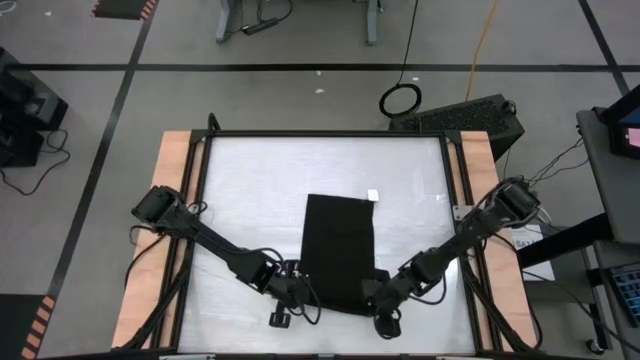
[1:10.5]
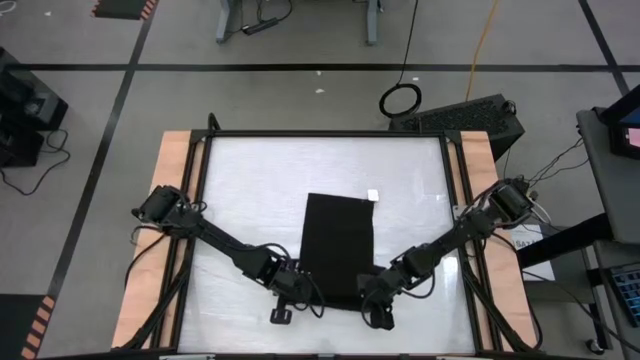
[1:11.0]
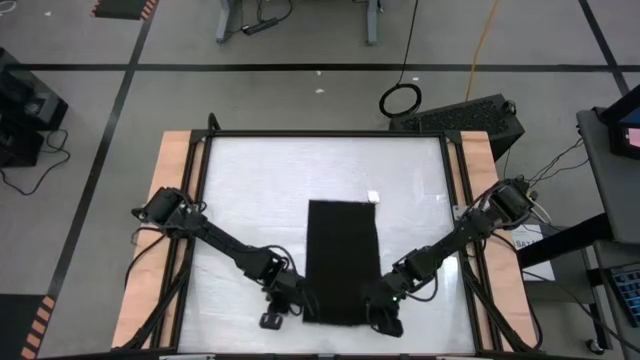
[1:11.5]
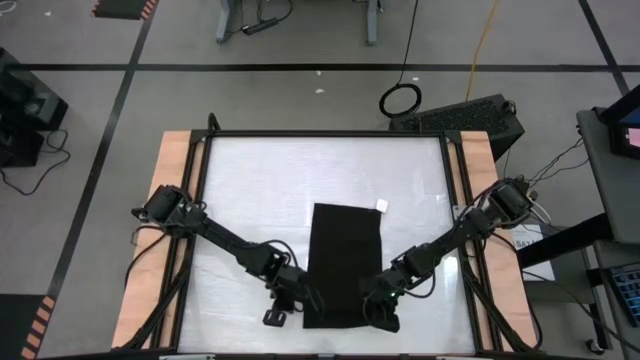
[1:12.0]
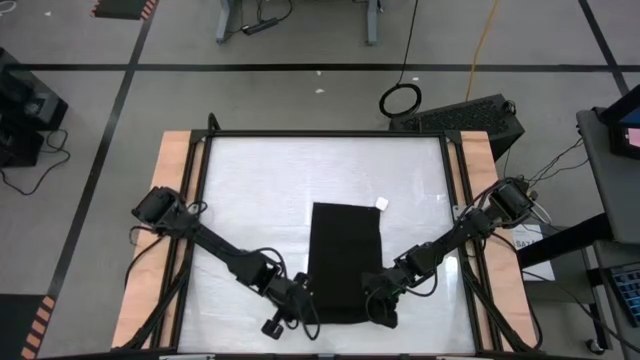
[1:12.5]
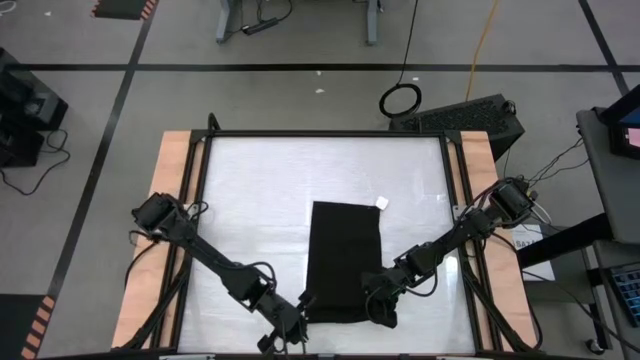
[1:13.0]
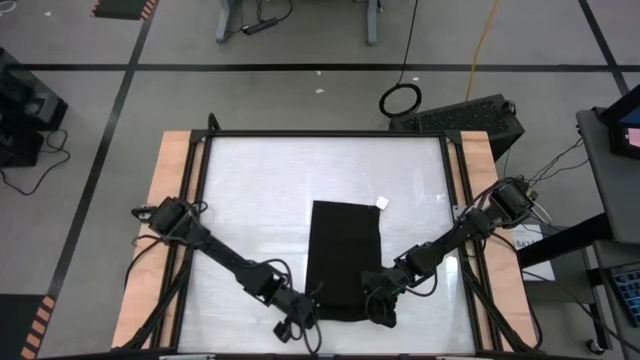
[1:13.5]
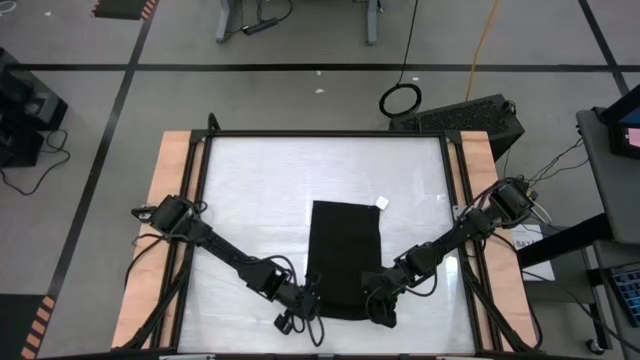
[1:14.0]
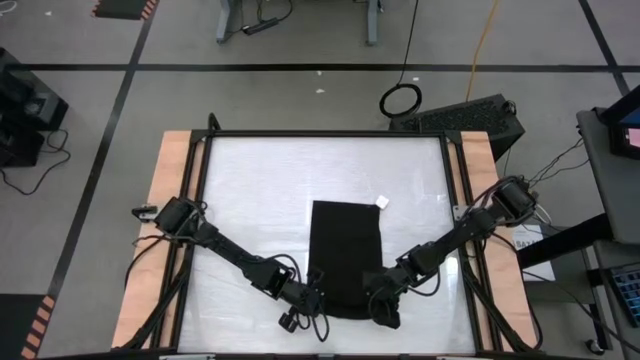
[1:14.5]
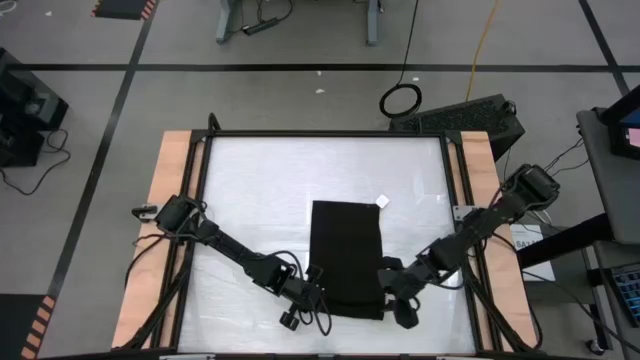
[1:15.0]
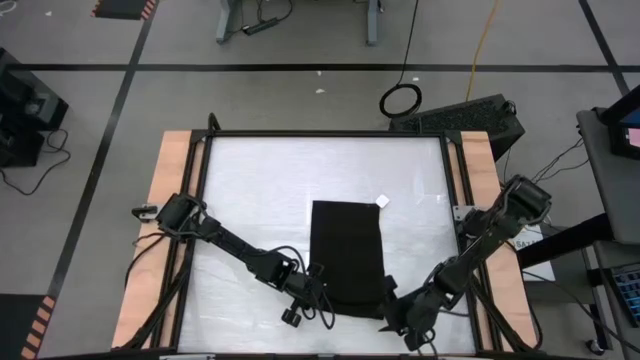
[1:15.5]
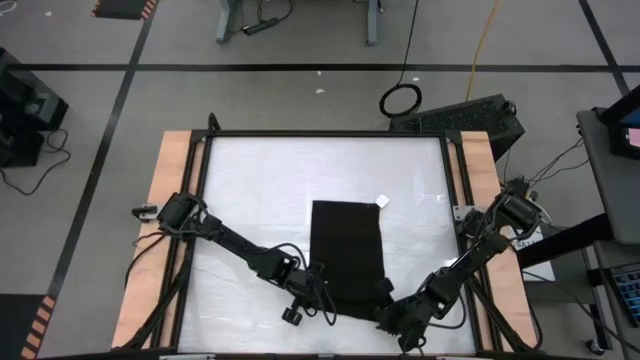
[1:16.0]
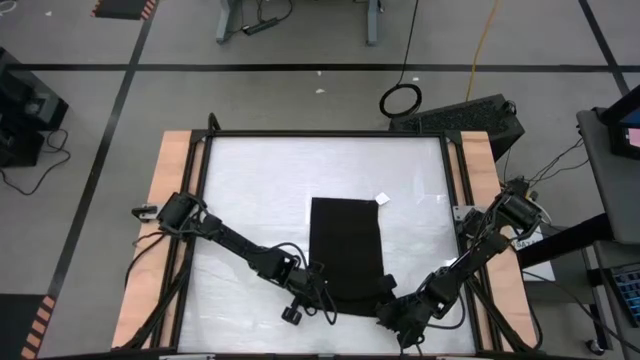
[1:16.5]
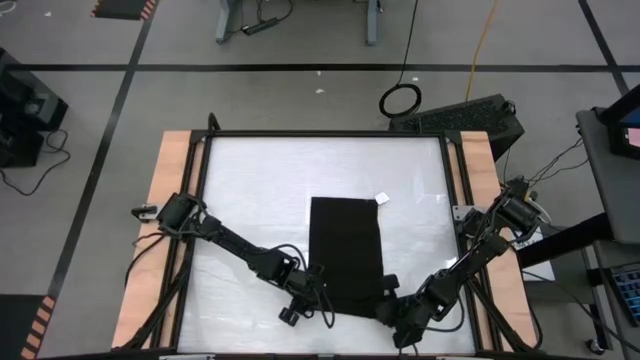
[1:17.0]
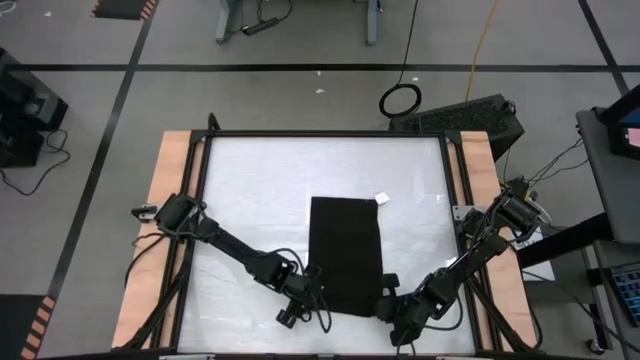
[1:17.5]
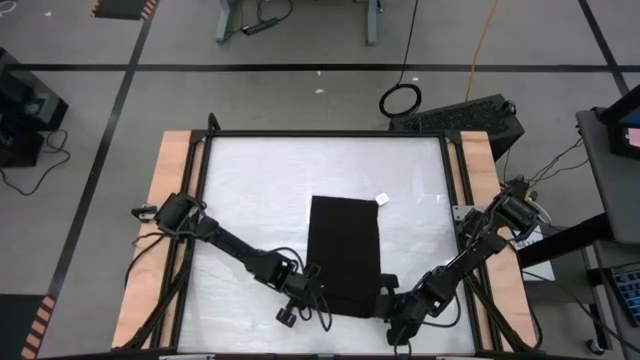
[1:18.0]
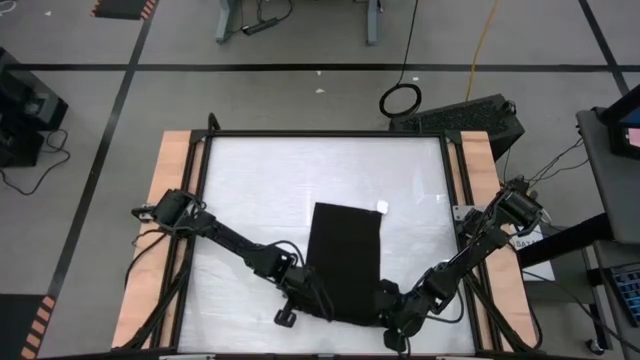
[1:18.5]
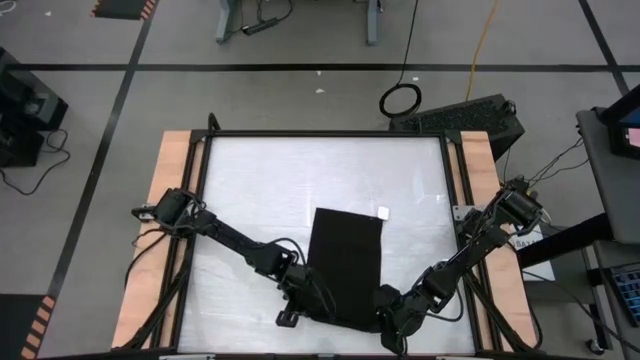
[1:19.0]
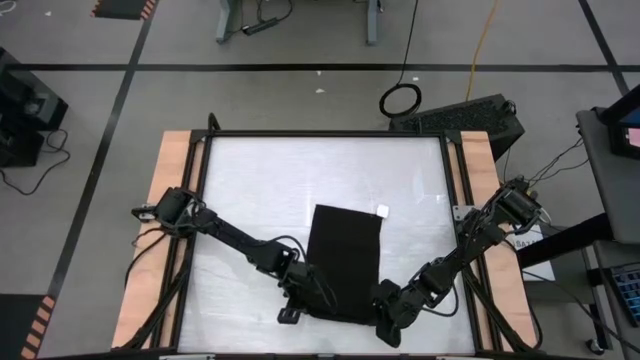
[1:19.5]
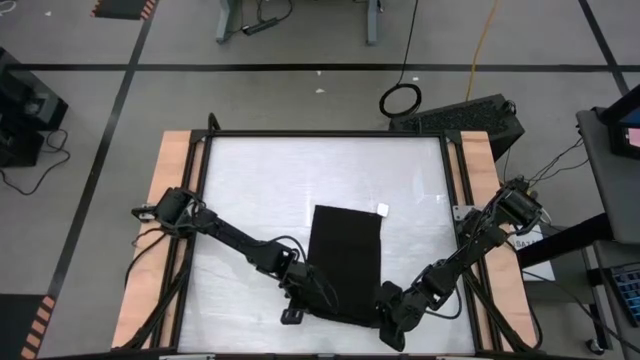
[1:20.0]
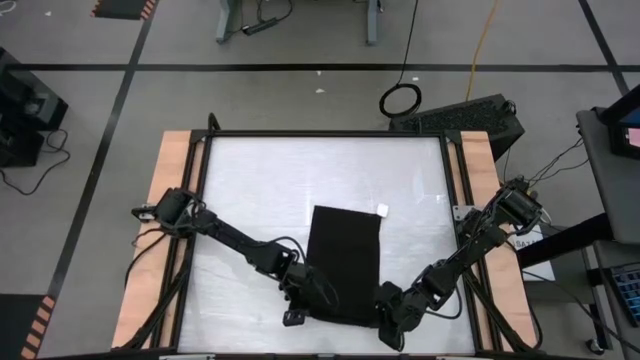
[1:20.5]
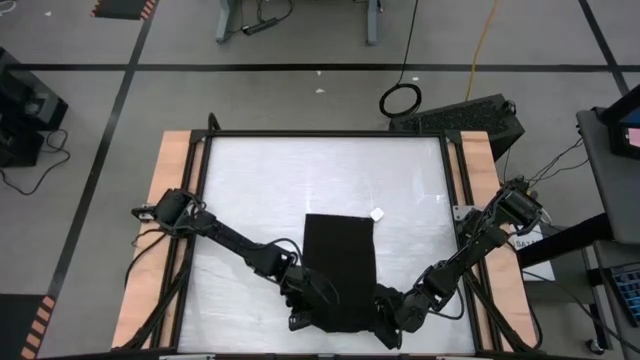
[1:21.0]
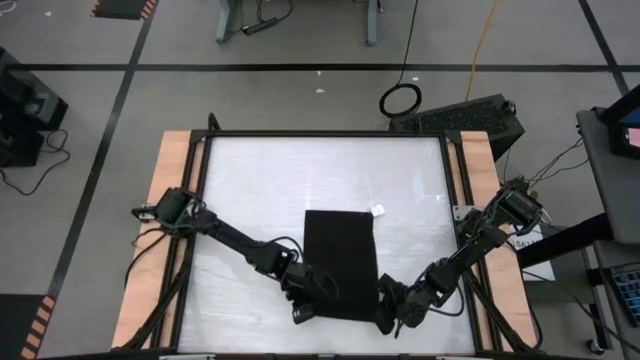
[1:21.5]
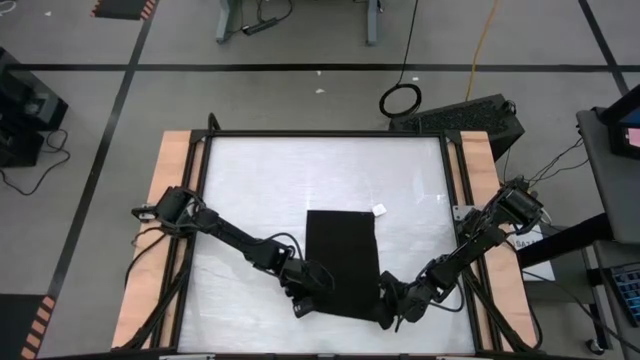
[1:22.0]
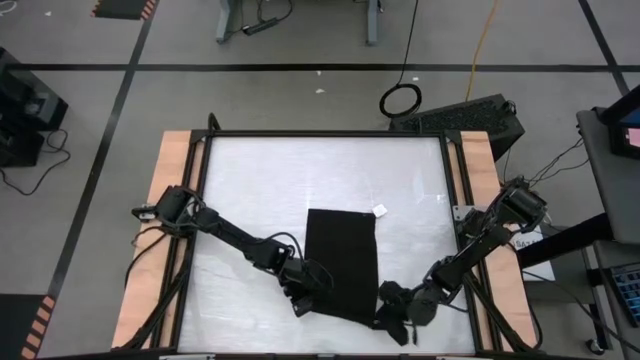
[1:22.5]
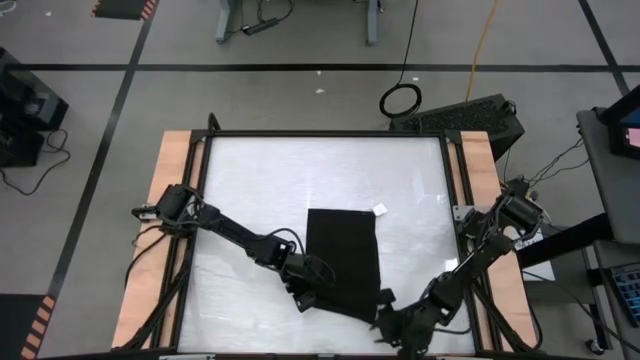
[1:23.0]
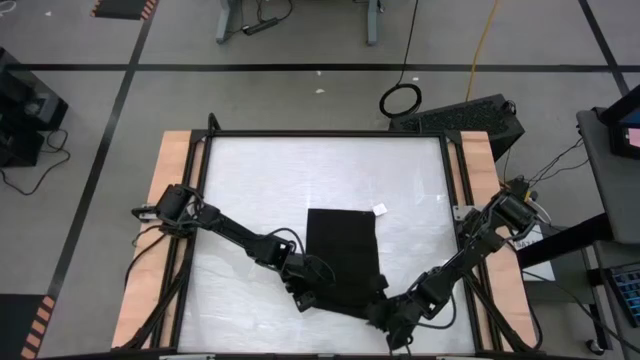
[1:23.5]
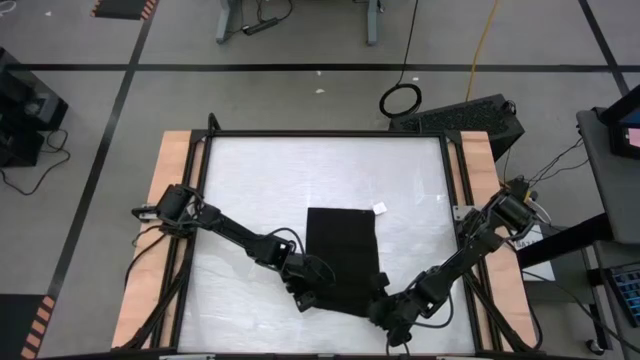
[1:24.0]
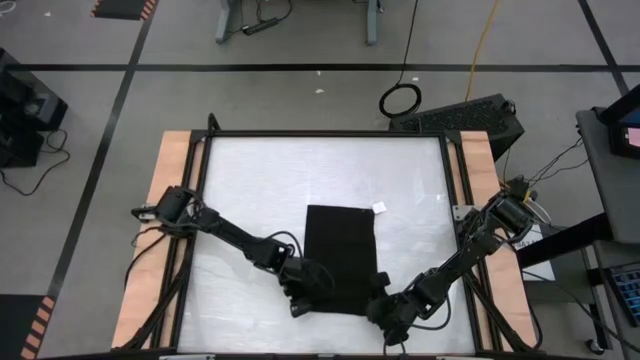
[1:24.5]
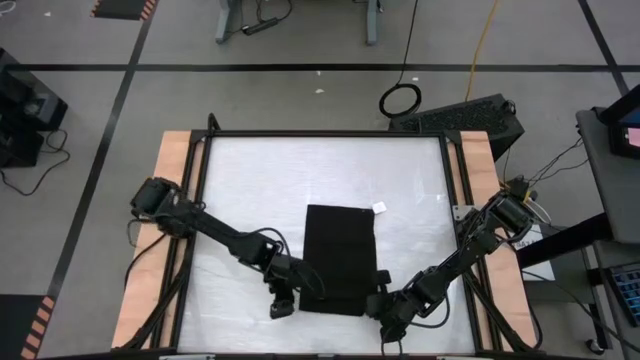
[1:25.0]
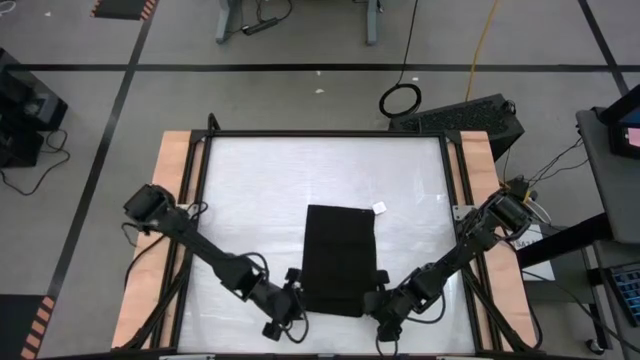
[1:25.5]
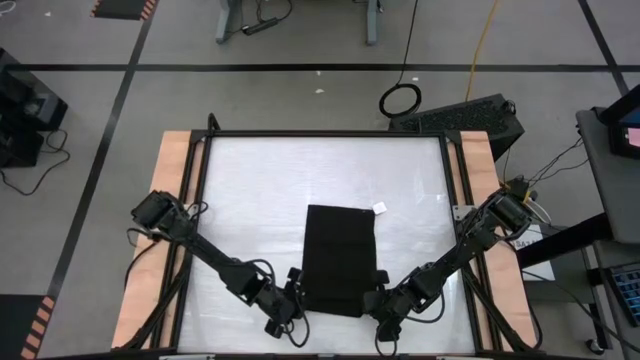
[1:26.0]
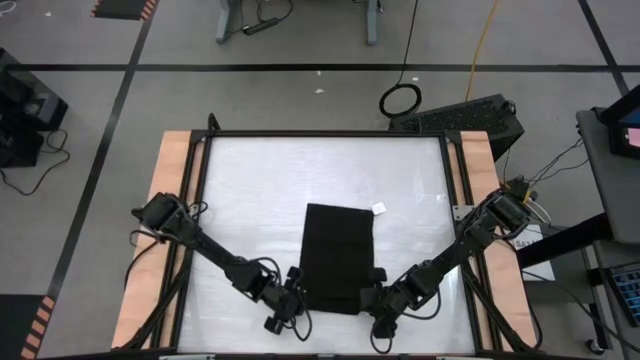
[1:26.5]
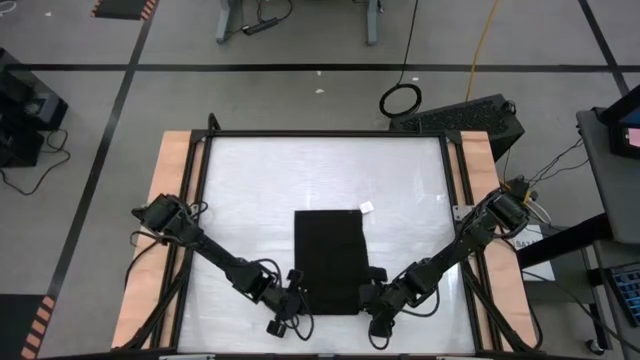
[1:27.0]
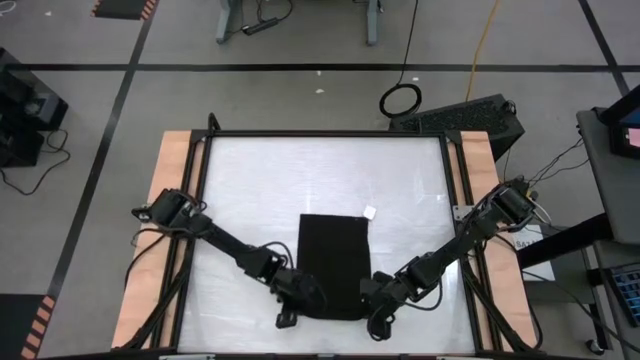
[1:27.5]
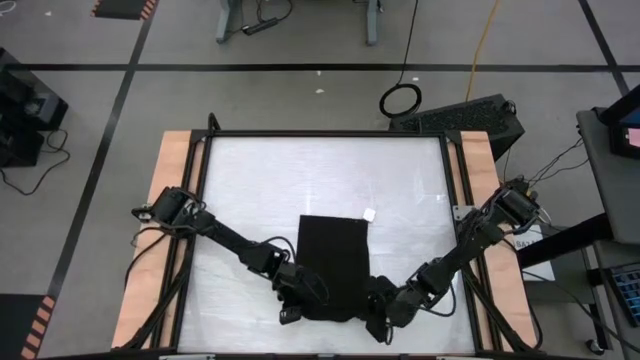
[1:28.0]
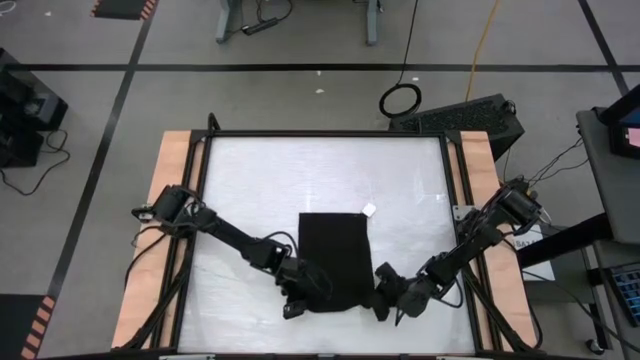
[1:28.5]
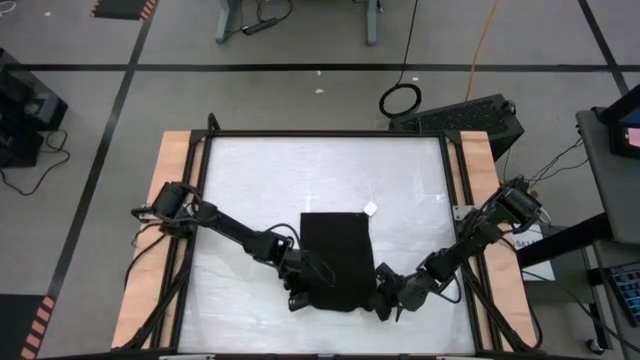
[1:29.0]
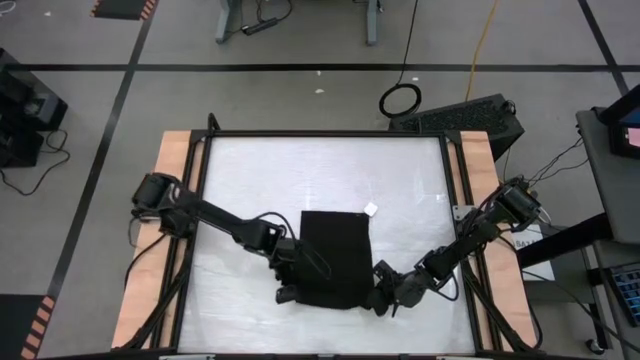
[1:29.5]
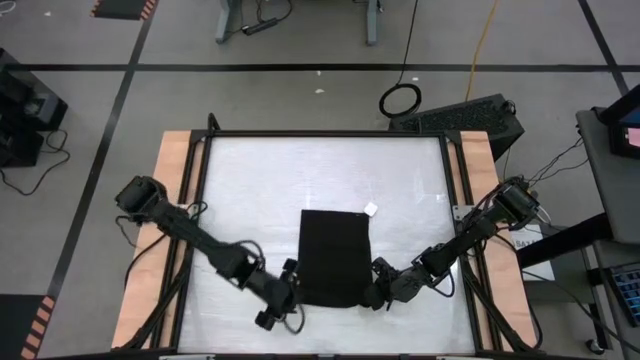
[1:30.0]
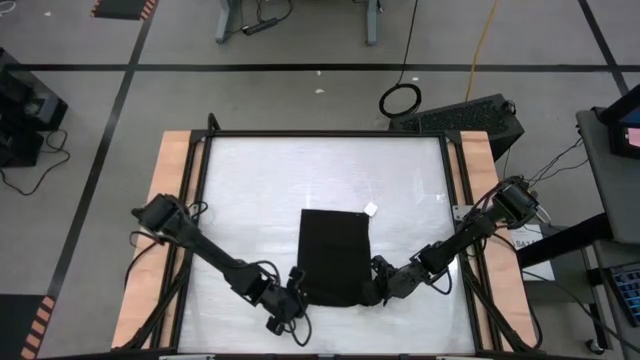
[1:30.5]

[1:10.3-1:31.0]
Task: Roll towel
Roll the black towel
